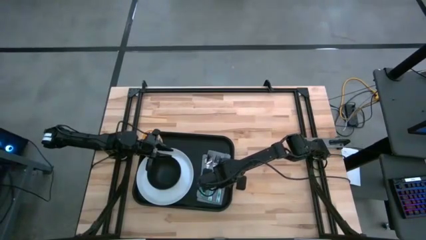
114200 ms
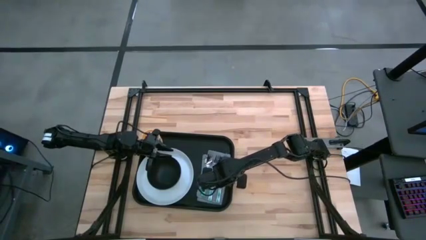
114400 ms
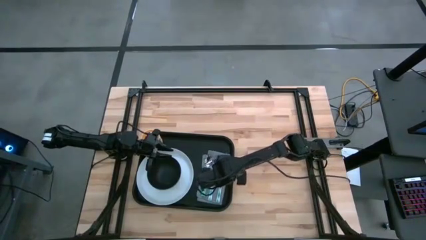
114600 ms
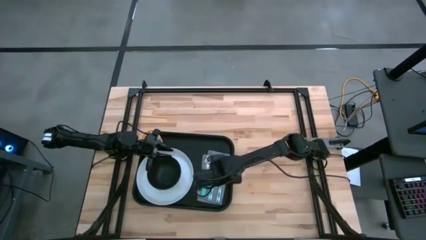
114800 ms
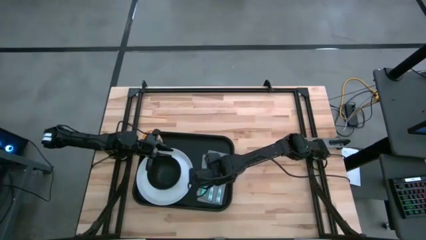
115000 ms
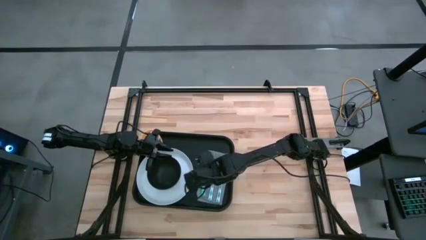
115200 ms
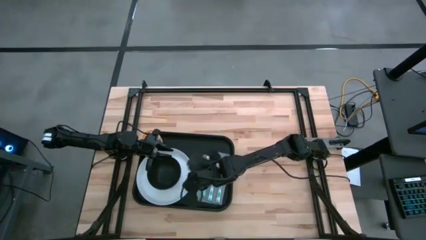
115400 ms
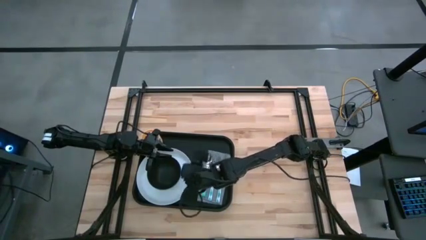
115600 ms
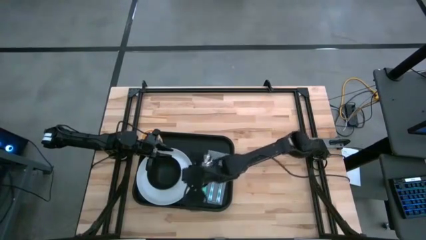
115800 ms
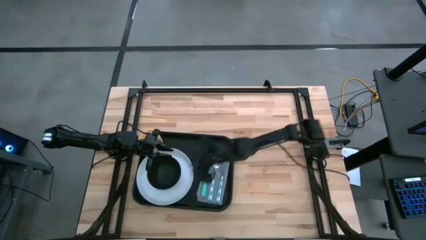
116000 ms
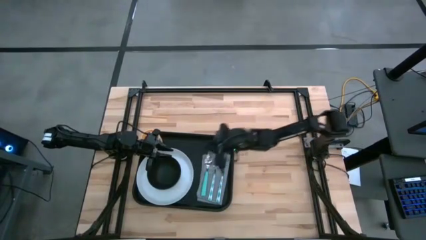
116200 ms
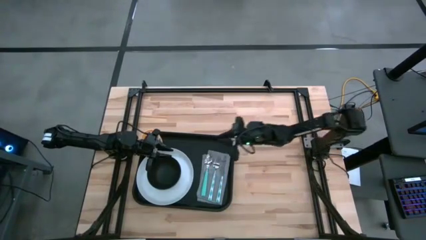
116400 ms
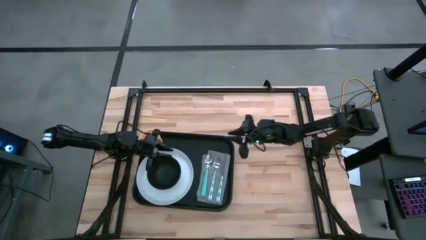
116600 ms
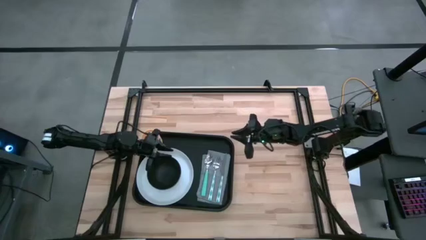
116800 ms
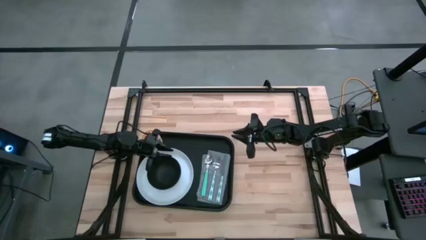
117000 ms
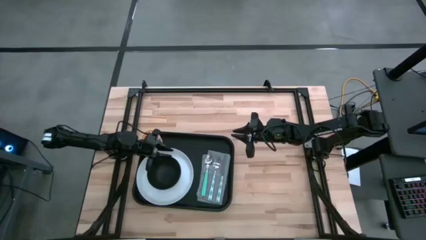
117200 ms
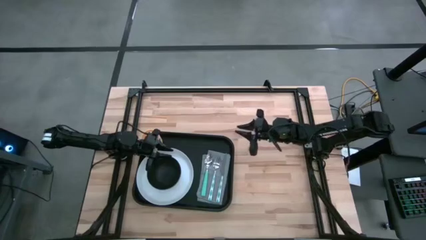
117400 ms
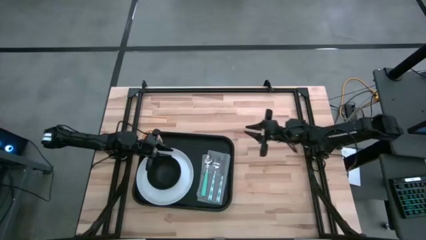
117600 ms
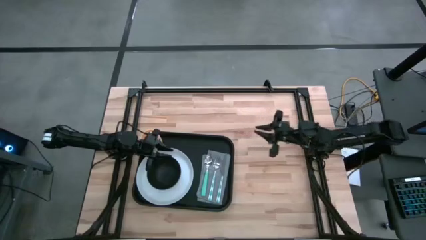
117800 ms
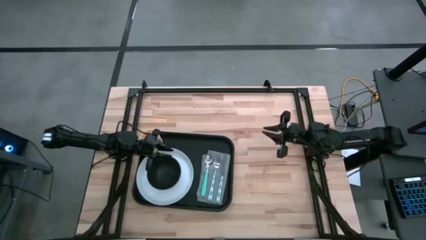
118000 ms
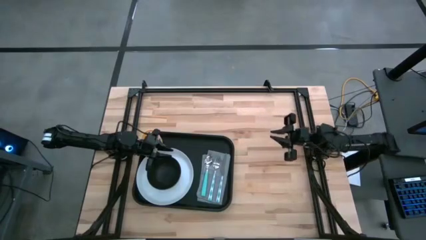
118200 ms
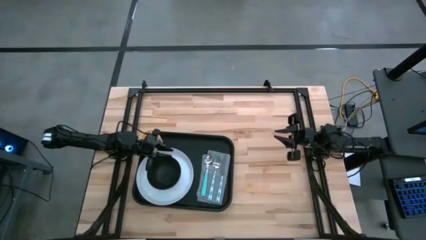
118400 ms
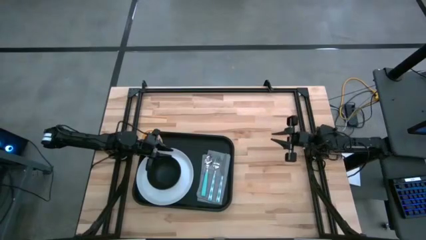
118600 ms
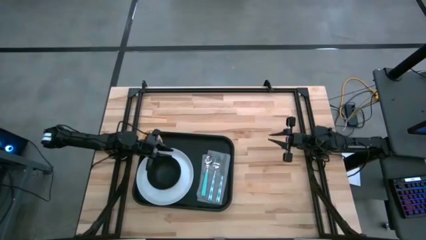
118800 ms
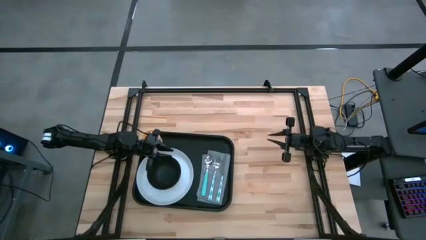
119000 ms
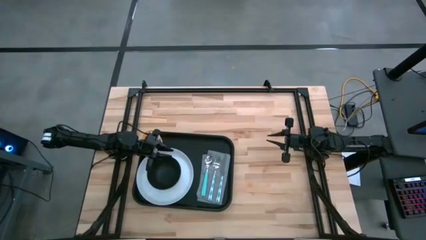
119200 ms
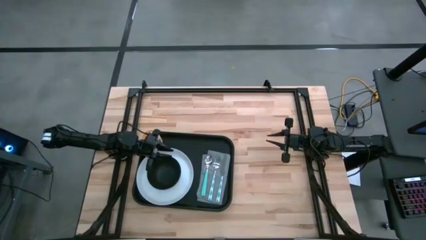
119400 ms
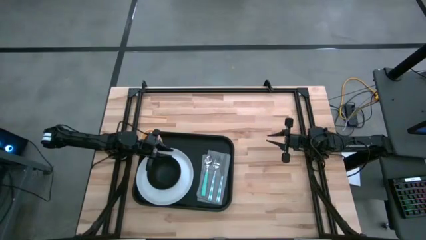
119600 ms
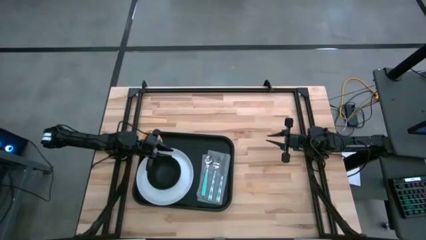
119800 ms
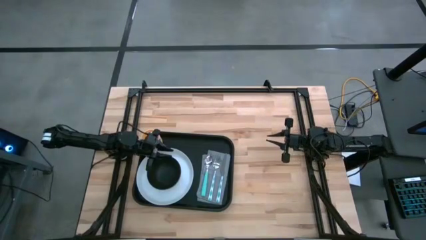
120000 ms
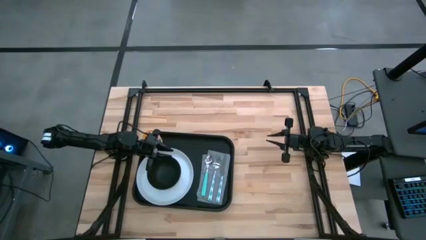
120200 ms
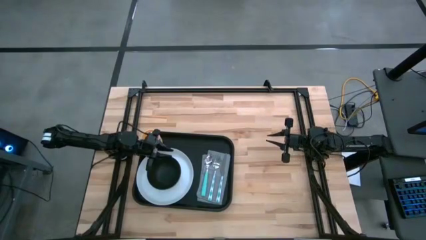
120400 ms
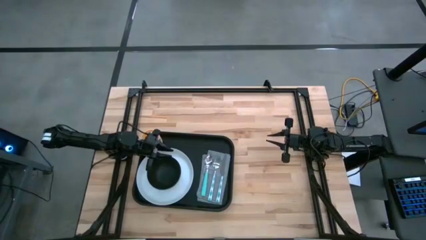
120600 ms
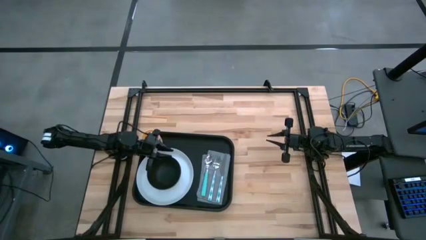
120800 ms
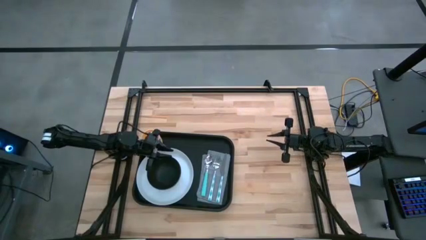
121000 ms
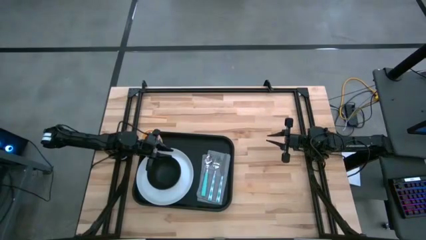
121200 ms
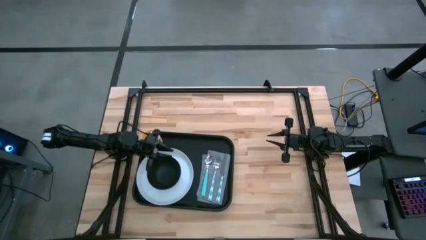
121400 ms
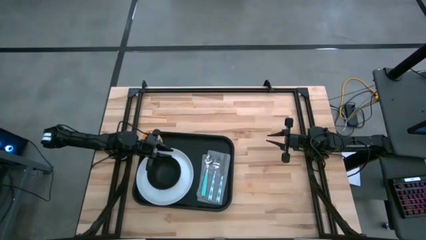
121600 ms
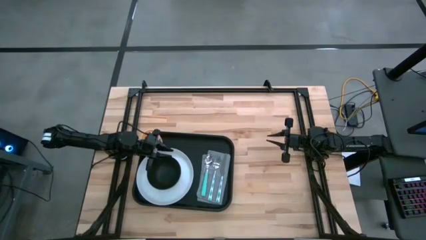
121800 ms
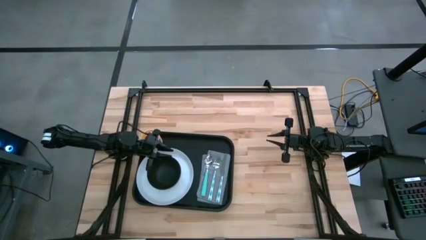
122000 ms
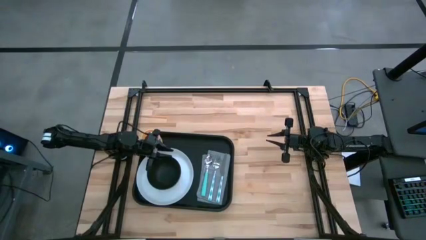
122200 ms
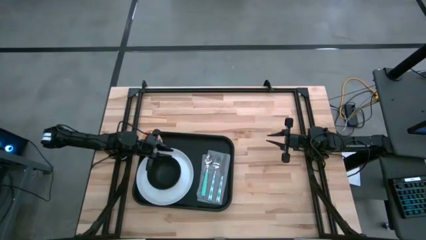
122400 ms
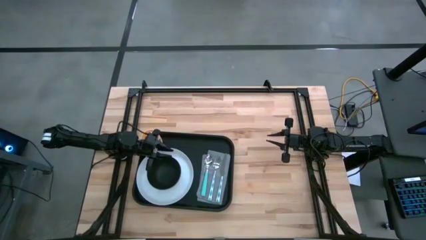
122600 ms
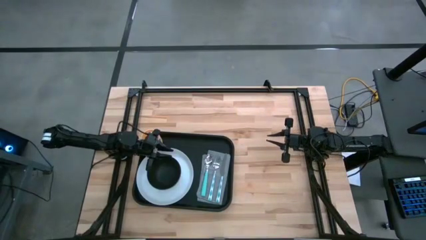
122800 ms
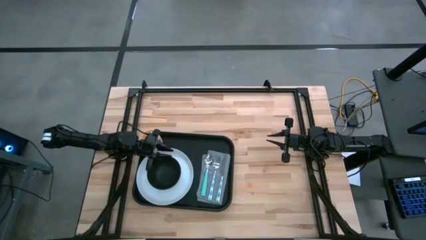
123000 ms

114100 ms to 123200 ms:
Task: Set up tray
Return to Home Position

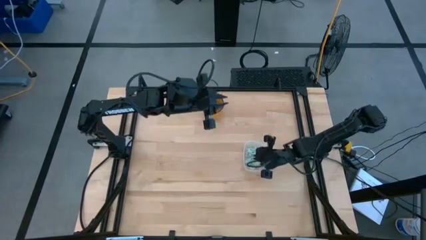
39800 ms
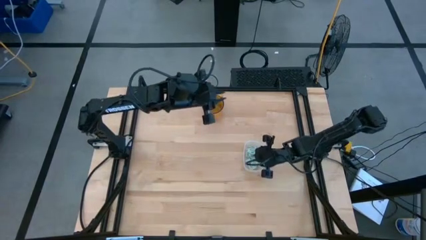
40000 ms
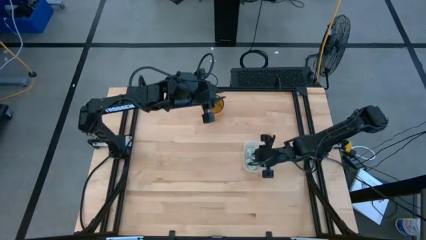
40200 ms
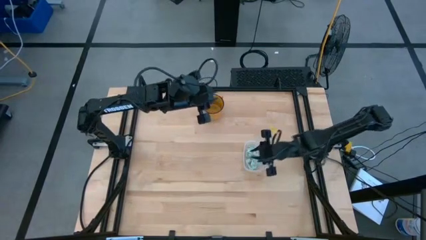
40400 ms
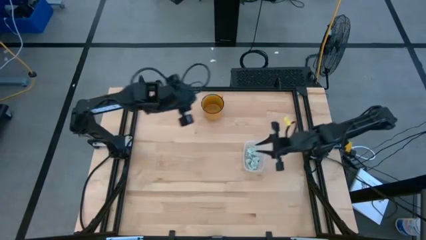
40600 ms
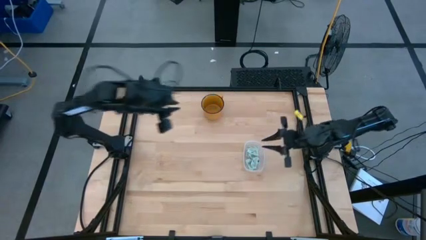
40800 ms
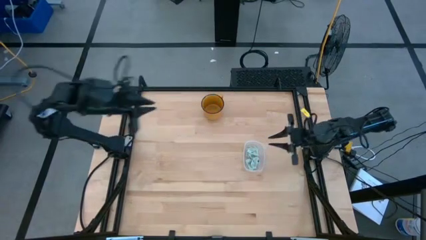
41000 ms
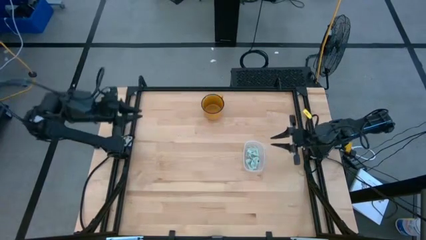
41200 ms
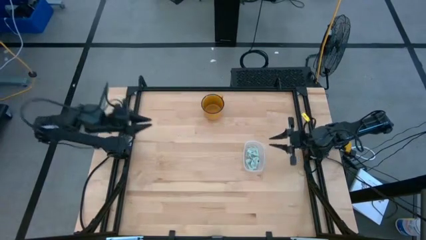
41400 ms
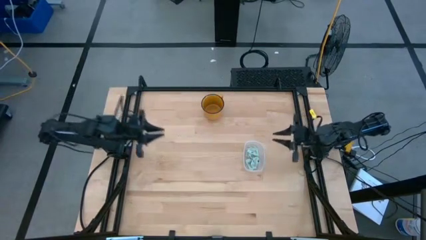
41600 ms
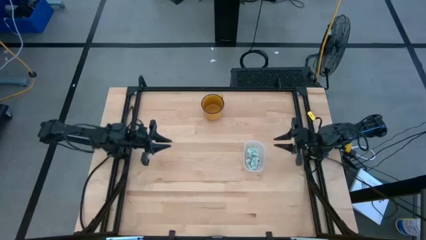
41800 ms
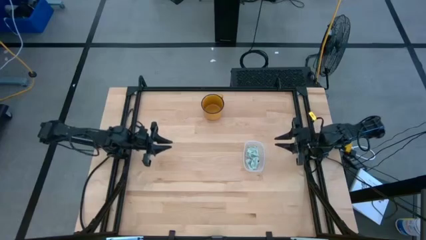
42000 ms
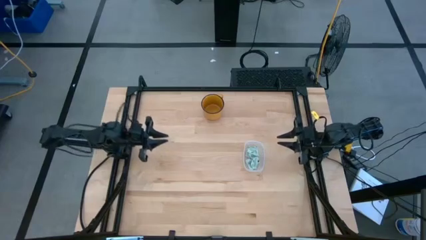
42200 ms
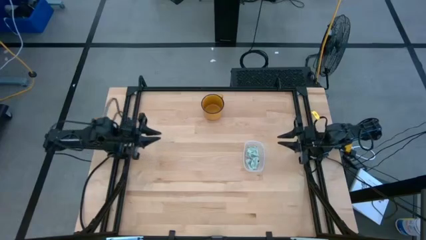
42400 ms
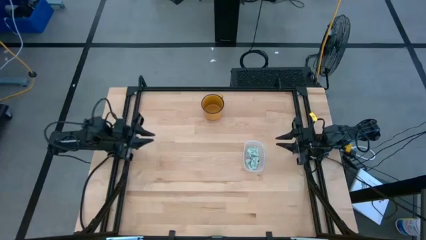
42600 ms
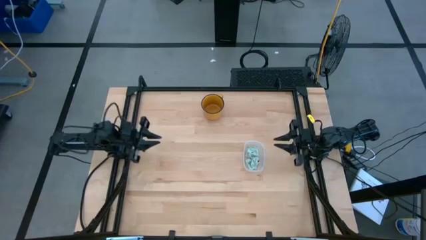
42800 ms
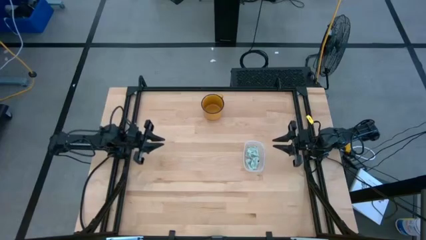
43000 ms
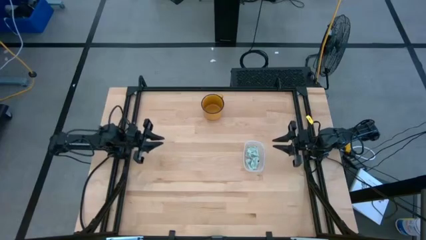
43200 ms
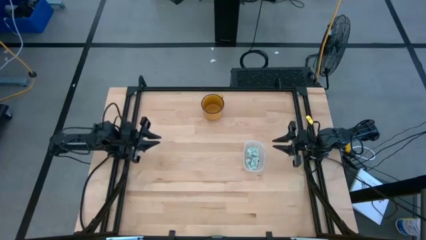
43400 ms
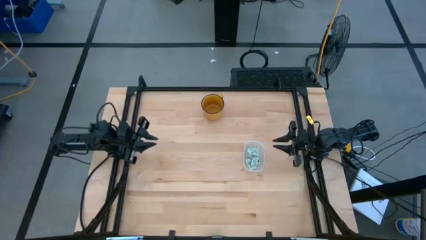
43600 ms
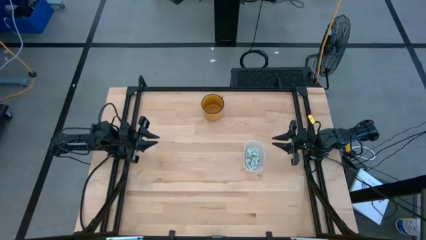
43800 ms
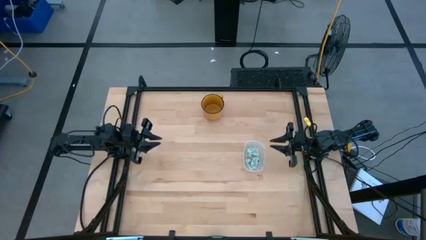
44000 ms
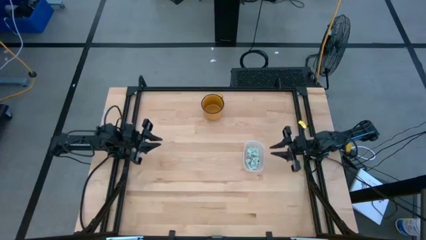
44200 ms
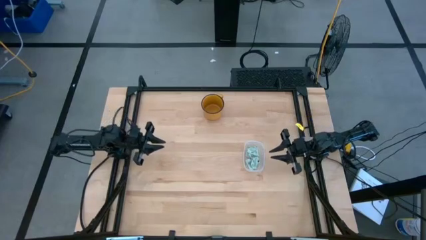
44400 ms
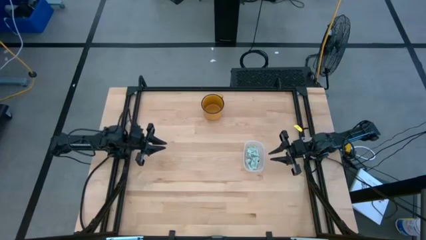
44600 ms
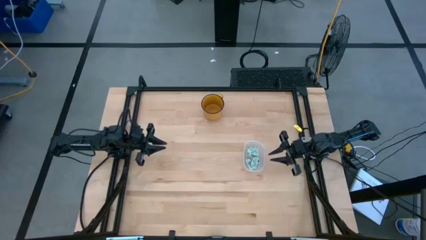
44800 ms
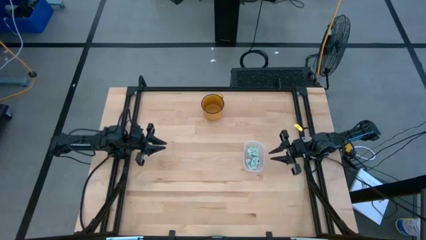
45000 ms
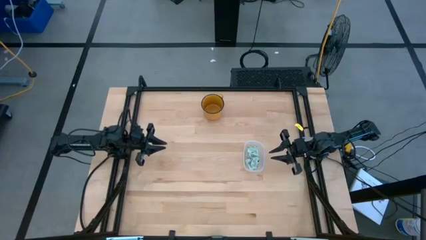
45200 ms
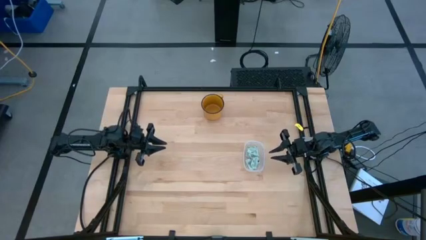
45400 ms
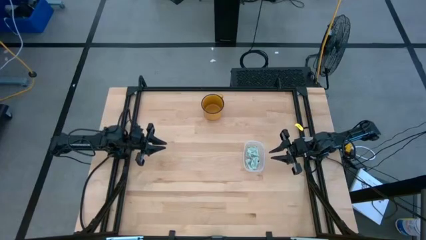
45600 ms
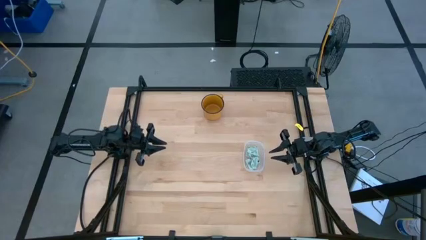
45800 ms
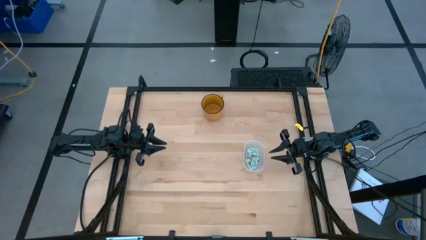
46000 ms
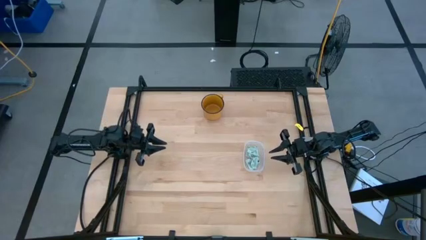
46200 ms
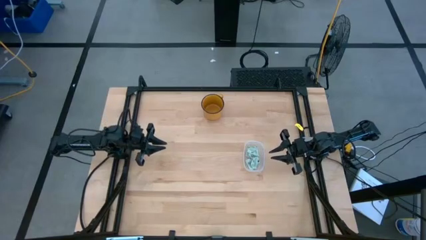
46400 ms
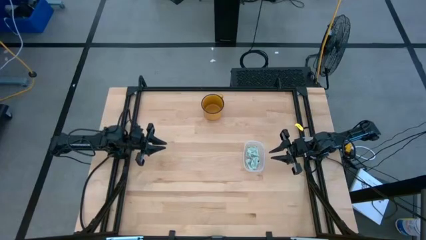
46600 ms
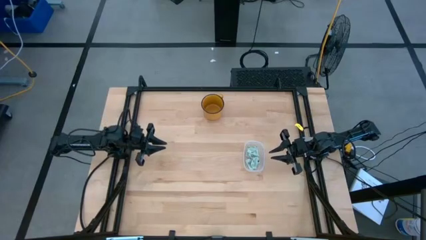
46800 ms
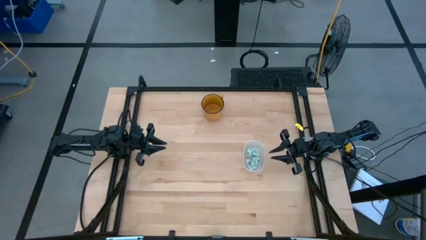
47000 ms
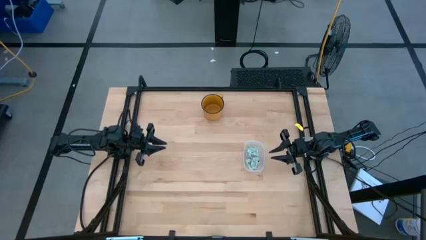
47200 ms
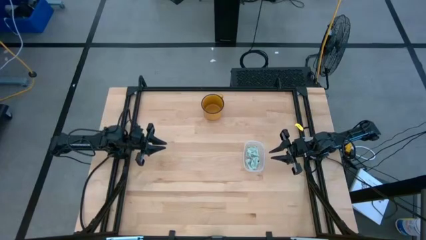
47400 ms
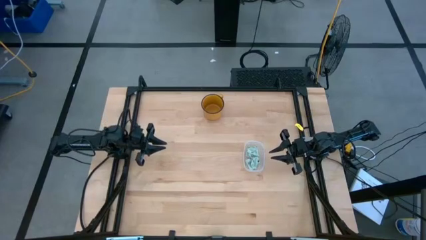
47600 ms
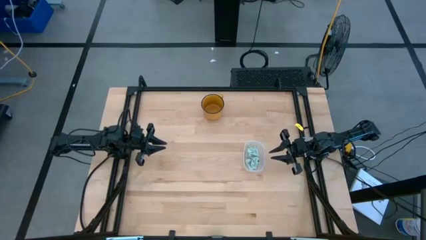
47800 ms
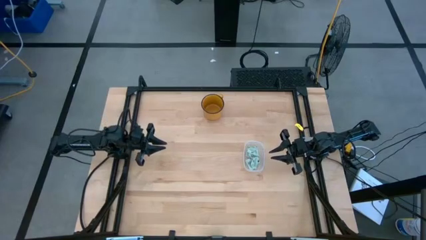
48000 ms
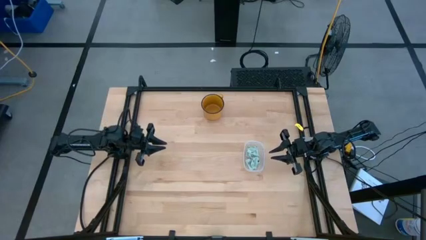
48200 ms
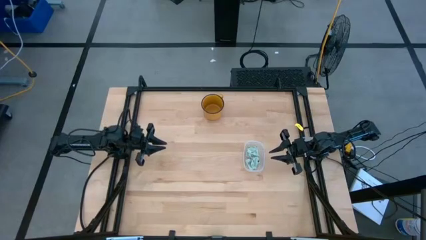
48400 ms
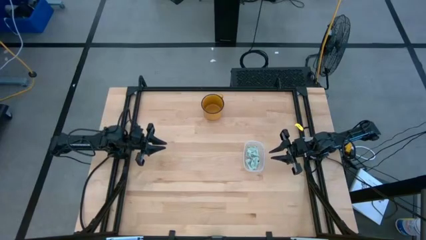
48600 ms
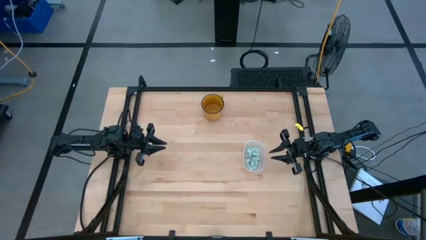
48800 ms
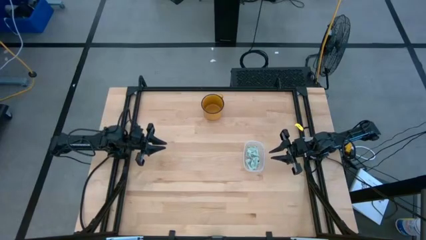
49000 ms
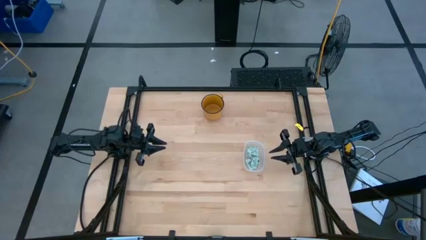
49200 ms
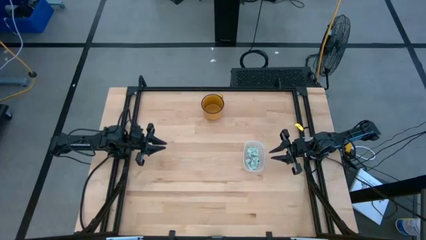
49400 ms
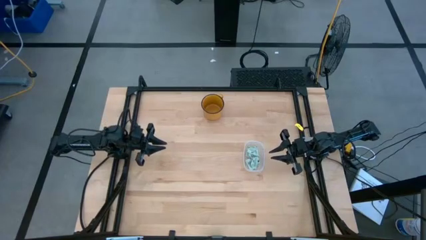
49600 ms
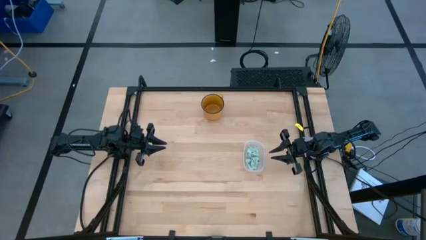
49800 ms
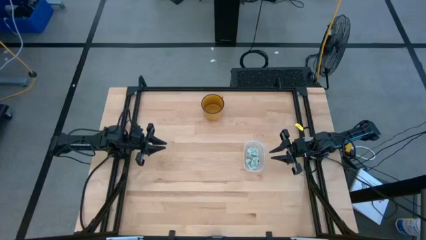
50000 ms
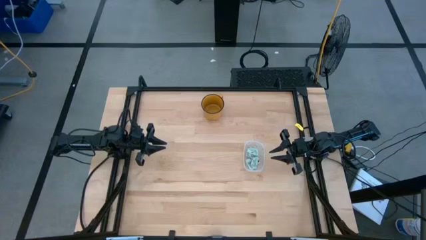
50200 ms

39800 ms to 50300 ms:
Task: Pick and place Stevia / Truvia into bins
Return to Home Position
